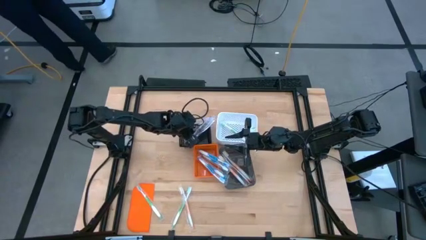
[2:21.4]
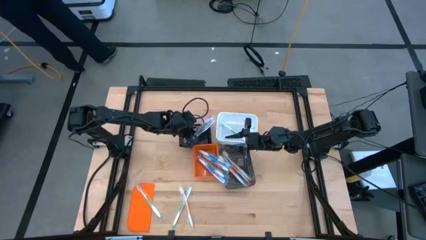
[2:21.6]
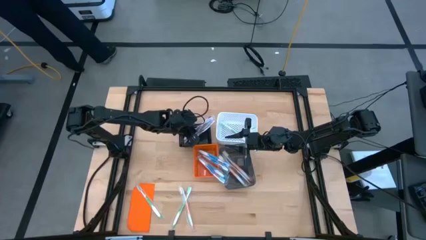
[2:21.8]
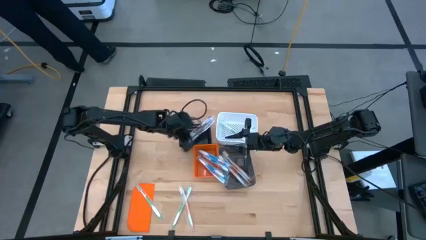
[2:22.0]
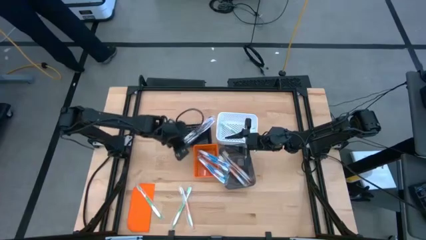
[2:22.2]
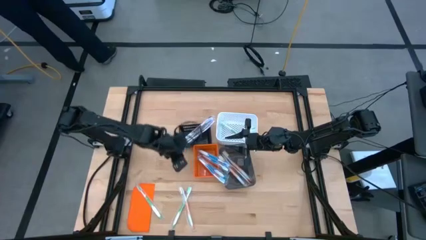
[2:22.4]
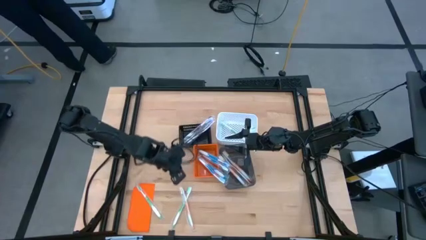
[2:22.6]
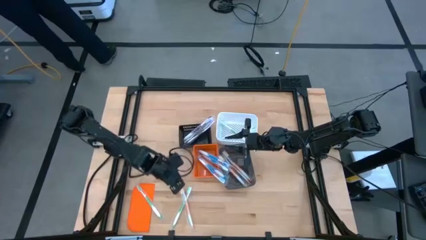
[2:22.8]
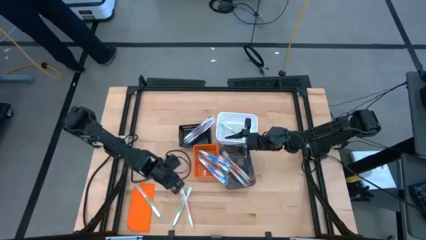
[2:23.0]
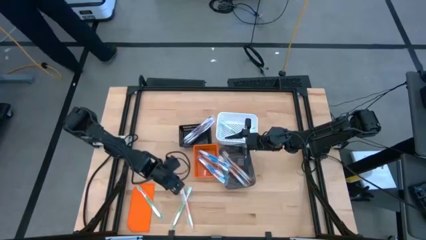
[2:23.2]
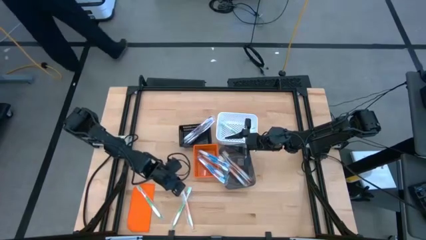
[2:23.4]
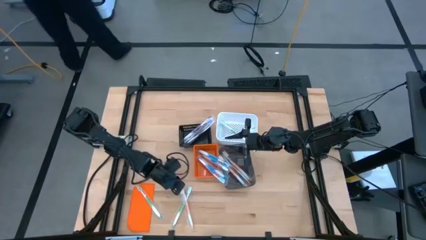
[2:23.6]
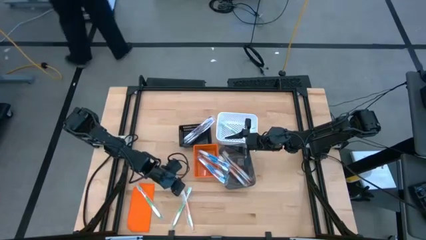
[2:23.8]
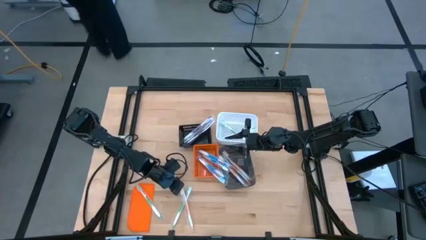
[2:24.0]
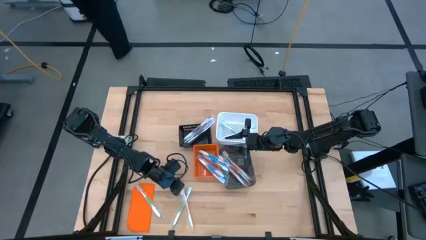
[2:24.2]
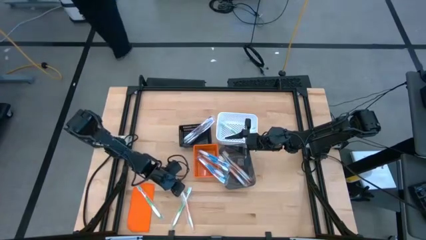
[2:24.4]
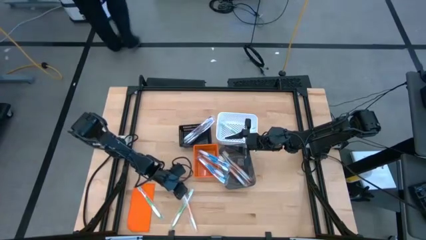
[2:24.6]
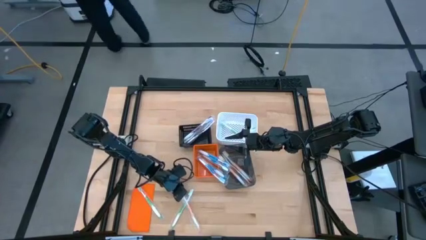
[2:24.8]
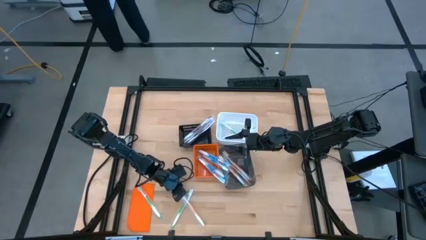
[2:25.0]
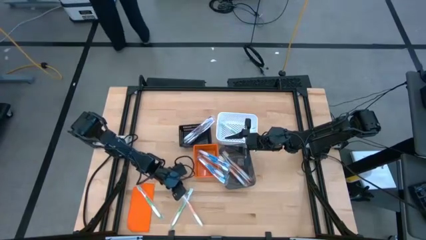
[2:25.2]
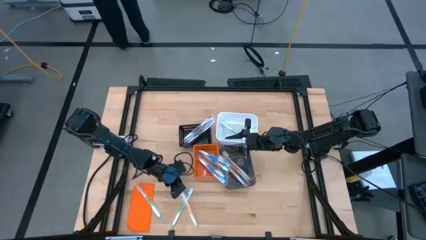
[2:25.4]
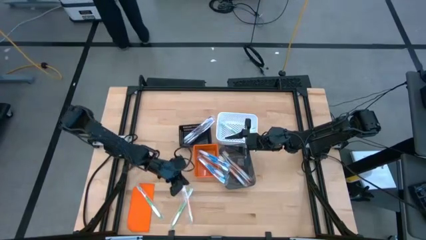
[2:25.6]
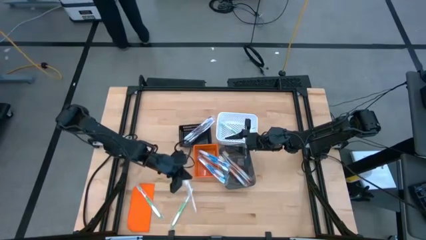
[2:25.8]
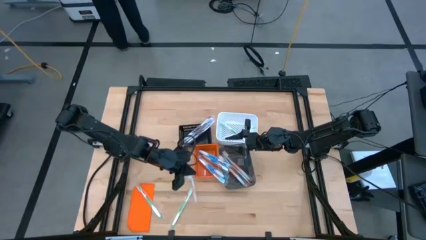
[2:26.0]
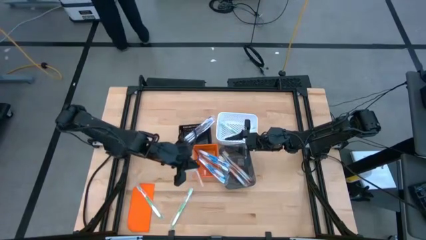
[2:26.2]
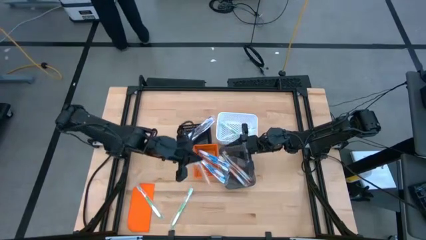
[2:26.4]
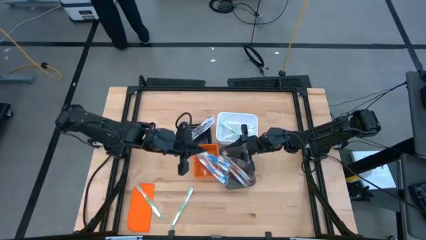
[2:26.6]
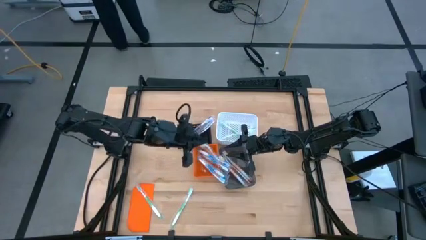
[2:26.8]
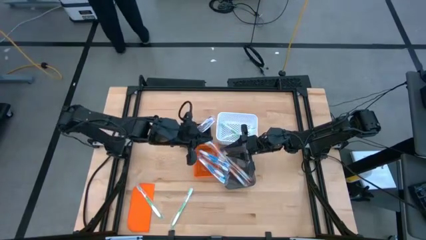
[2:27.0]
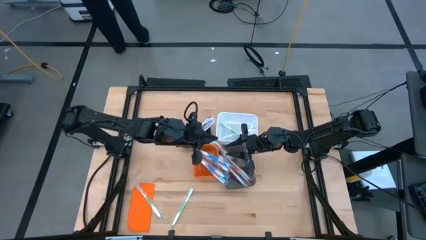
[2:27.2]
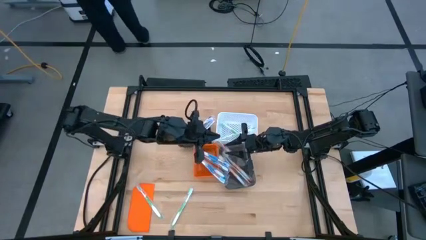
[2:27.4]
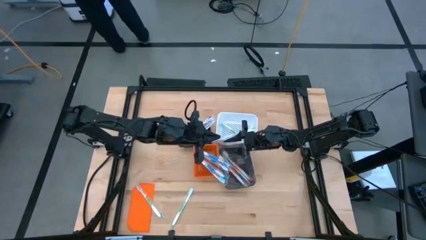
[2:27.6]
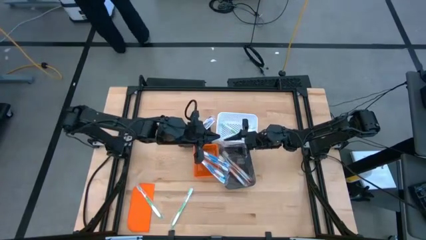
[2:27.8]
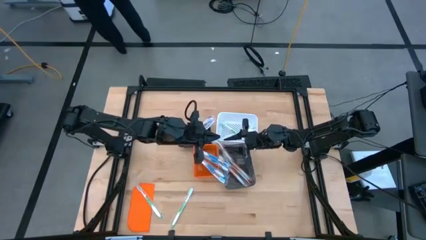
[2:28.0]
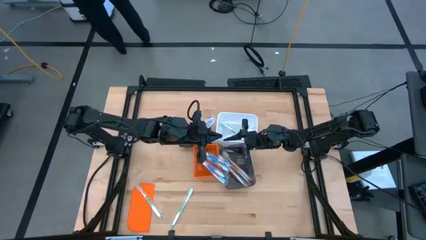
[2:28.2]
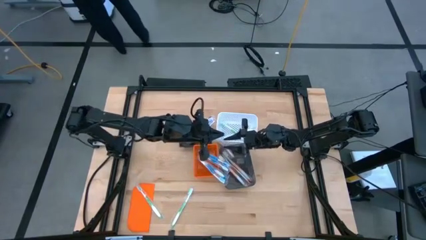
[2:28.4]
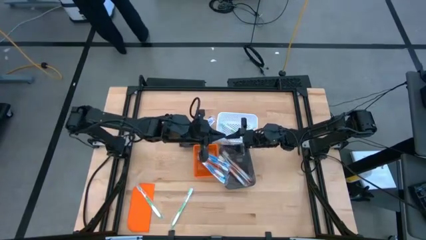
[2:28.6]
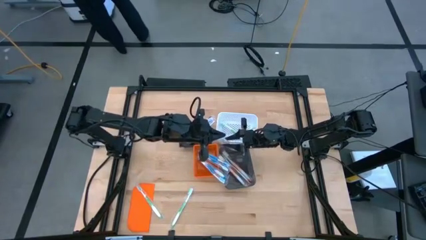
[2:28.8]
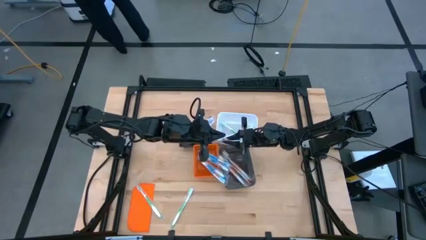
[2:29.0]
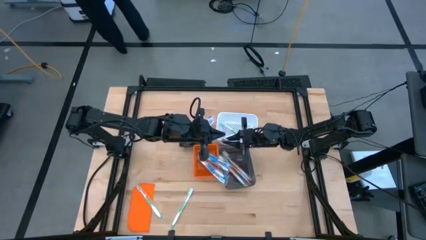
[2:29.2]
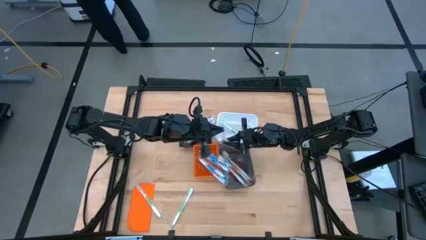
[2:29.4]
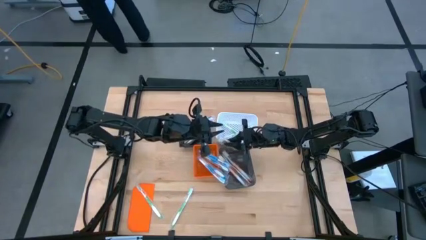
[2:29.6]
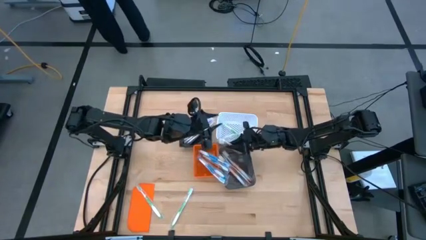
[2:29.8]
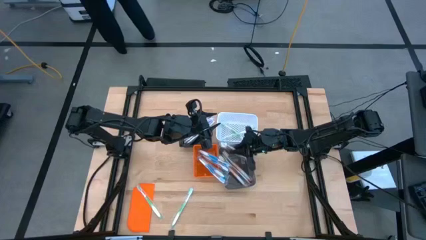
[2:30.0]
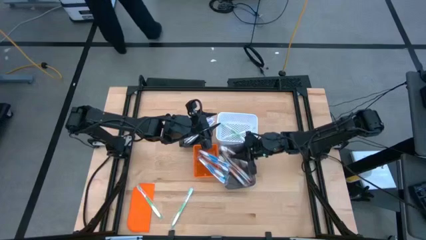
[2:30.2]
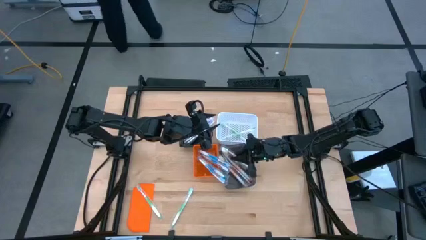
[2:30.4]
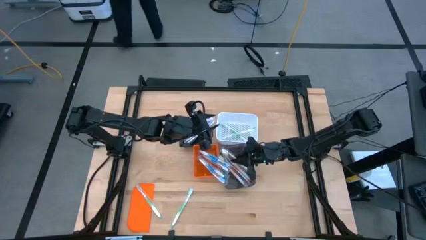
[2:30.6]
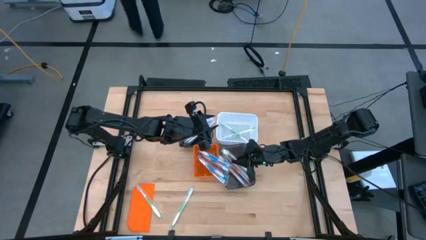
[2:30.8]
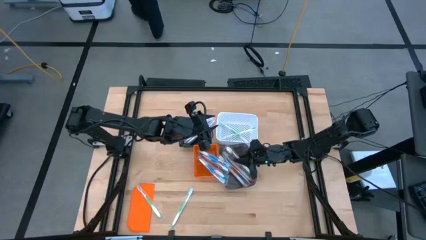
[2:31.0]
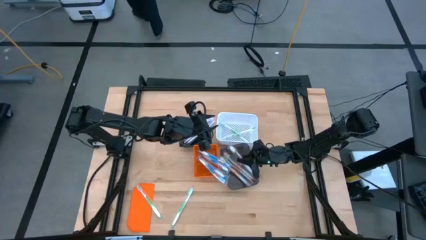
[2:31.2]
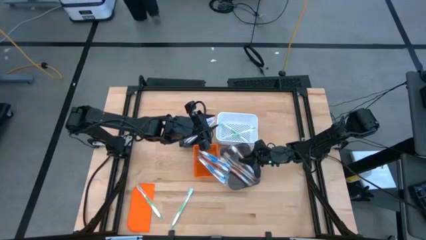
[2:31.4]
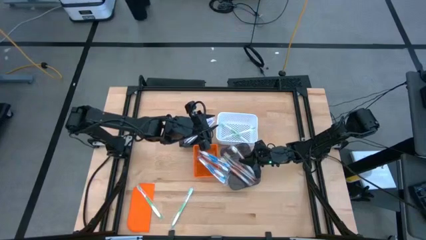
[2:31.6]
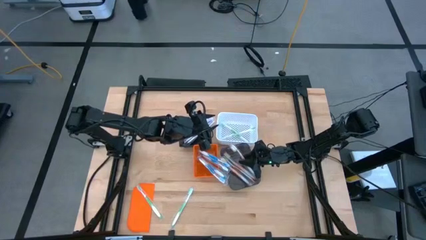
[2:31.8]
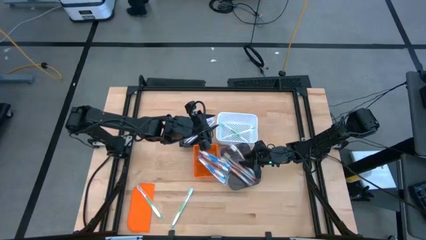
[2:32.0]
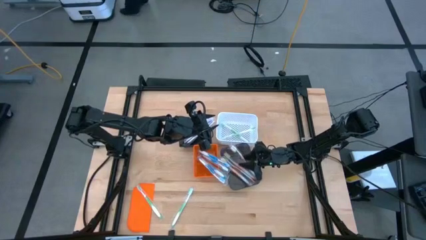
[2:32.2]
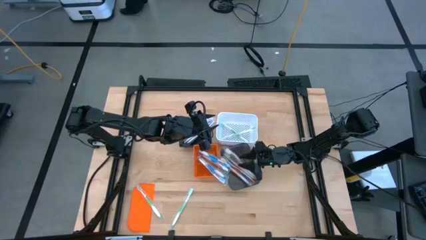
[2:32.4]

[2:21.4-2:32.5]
Task: Pick & Place Toothbrushes
Put the orange toothbrush into the gray bin

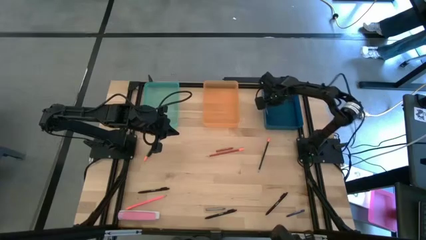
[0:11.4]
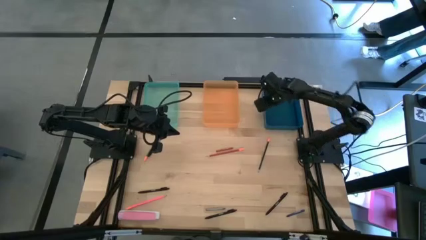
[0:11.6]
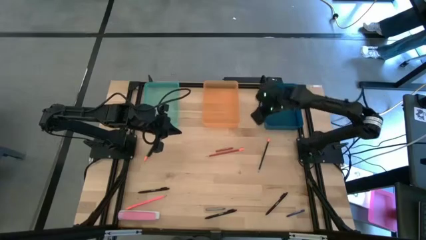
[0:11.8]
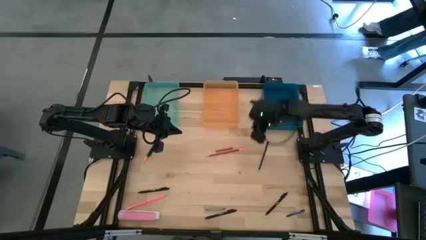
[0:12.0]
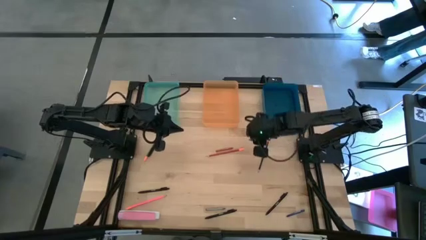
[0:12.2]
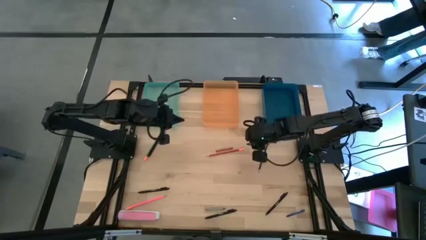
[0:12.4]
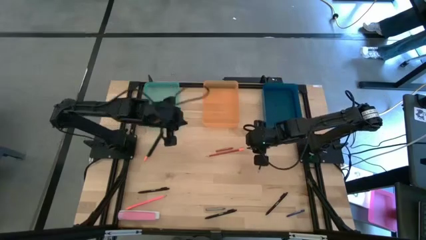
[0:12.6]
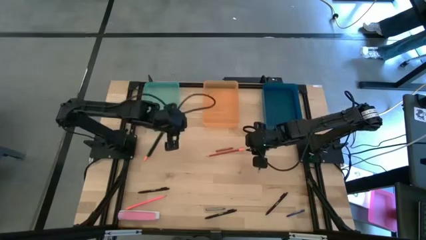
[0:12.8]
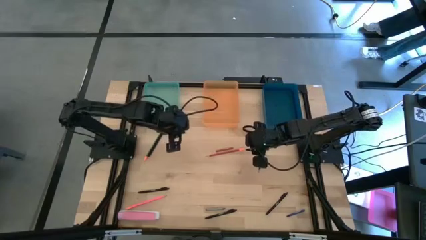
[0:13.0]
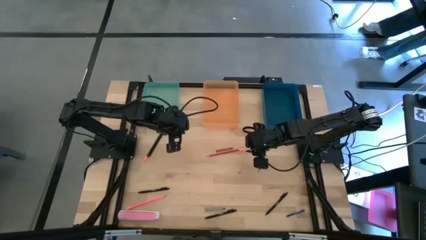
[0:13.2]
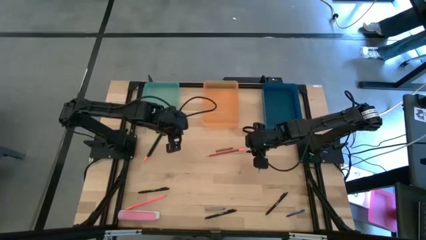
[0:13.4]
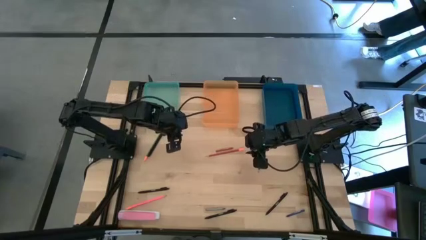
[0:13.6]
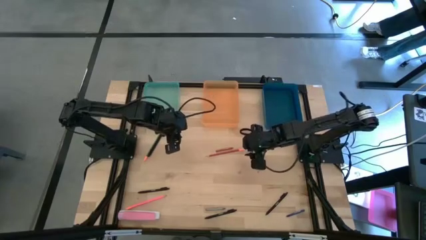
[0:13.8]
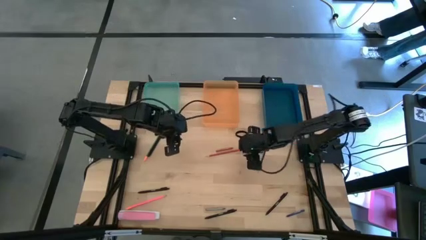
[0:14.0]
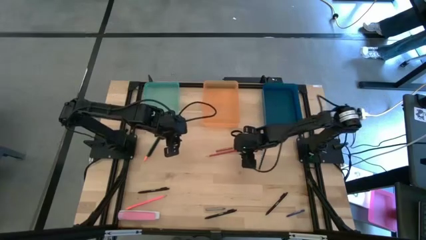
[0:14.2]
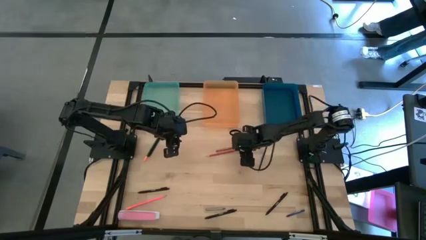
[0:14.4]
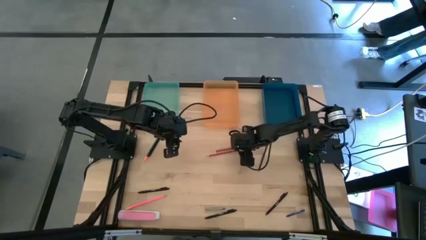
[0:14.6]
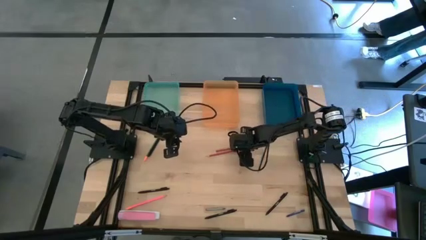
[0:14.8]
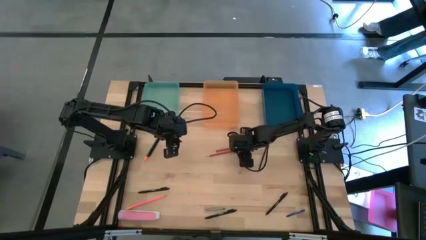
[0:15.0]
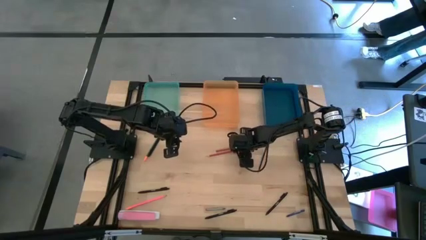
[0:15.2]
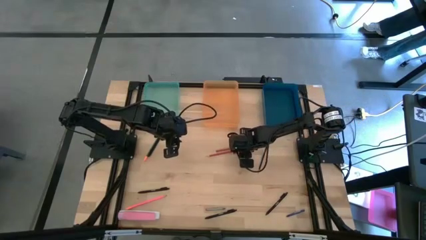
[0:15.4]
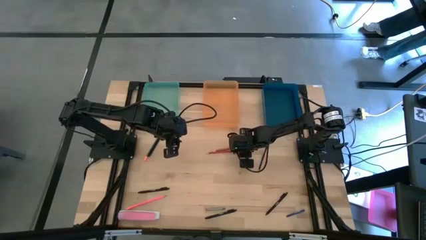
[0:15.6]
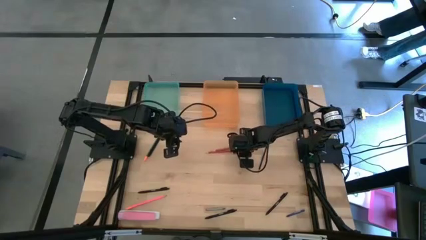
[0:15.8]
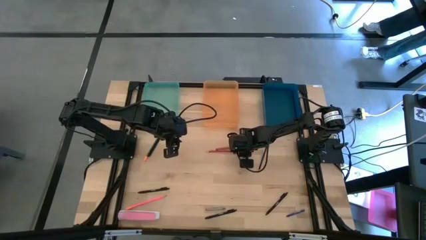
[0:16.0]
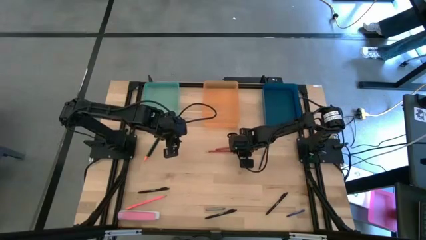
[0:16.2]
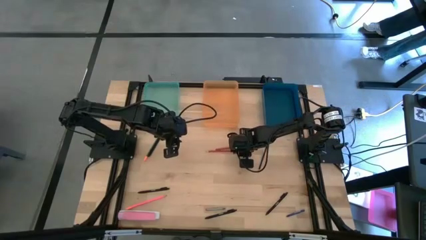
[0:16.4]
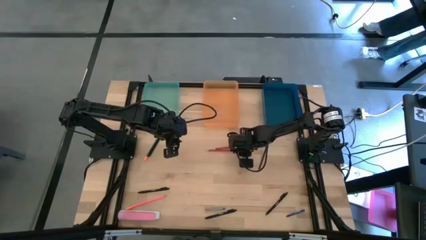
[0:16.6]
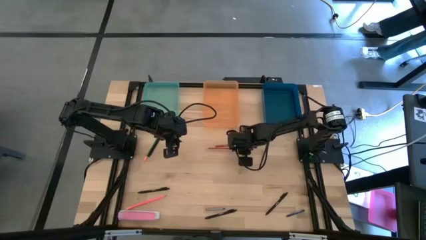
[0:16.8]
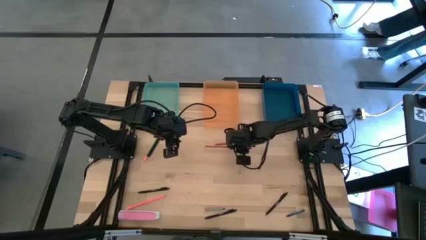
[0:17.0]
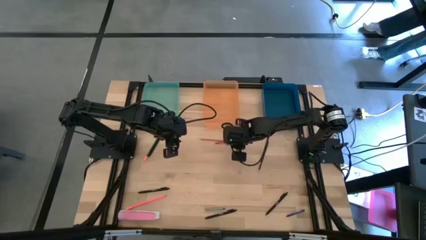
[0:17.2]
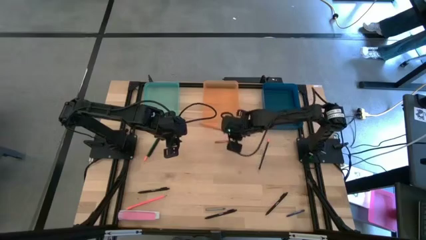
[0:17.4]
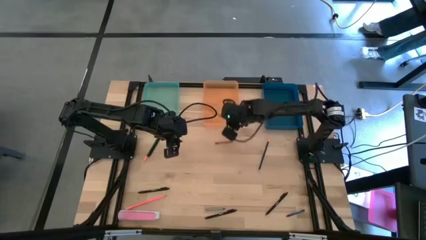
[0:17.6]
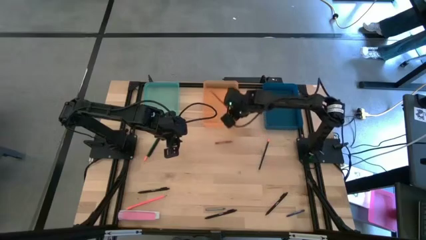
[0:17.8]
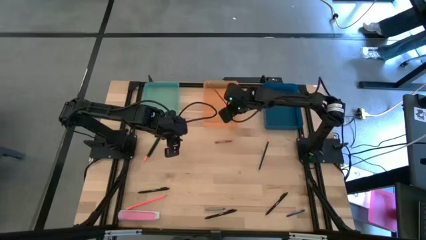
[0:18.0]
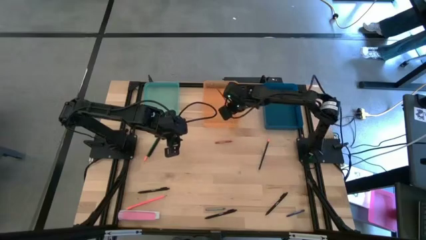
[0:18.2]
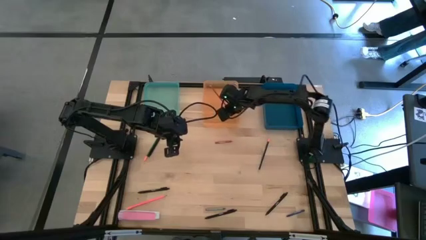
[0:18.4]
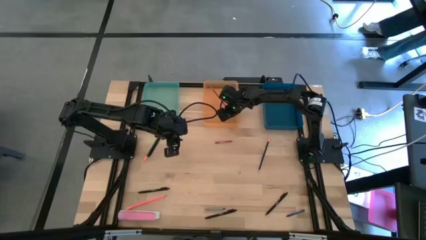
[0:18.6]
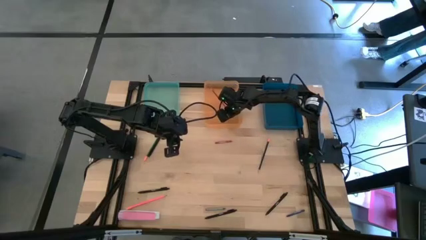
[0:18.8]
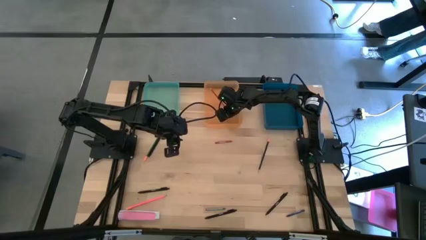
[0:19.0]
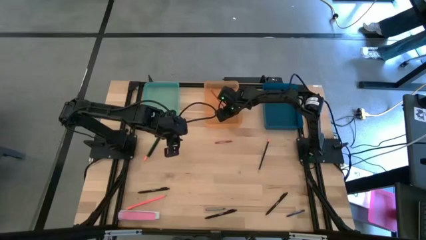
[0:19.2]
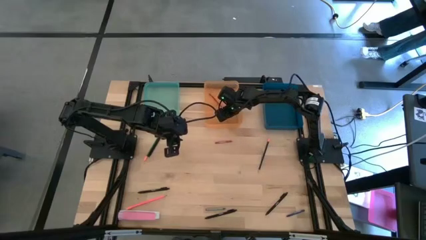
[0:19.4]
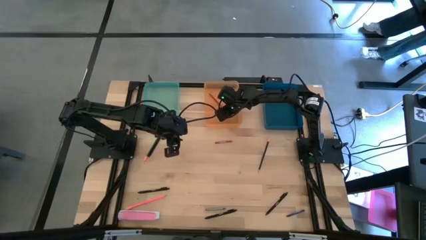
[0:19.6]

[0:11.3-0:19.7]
Task: Sort crayons/erasers/pens/pencils in bins
Put the red pencil into the orange bin
